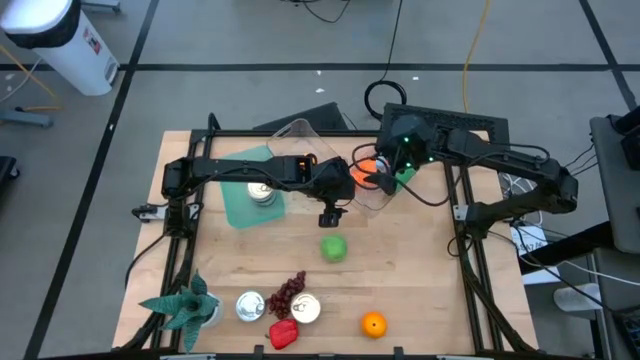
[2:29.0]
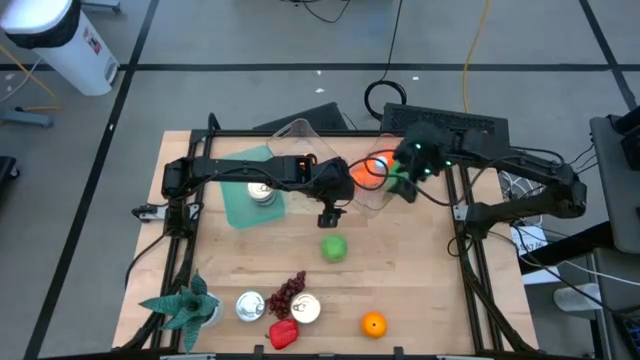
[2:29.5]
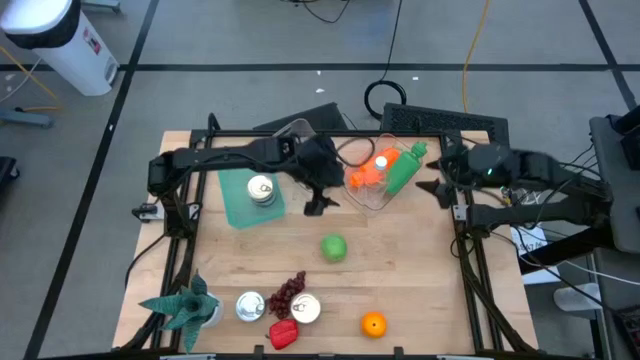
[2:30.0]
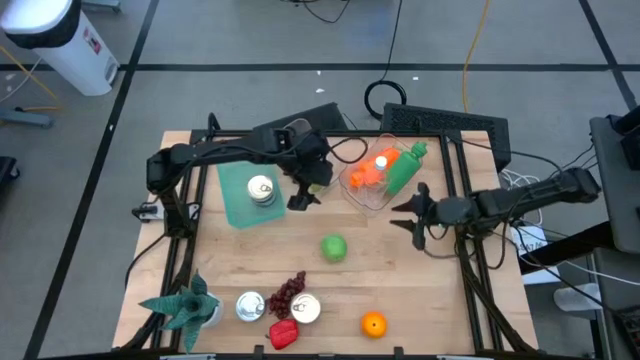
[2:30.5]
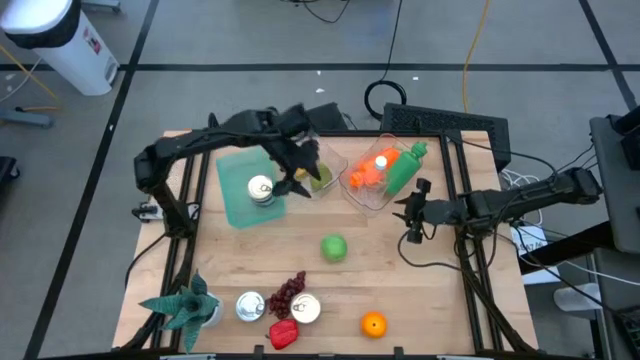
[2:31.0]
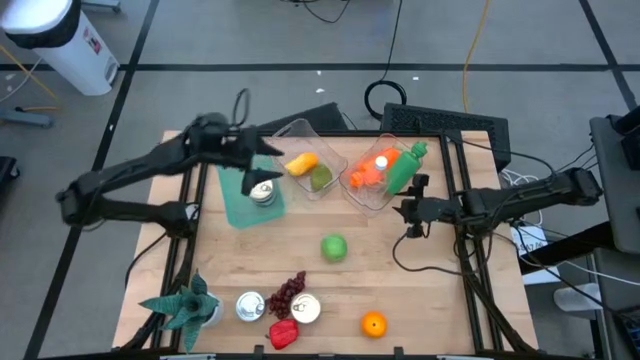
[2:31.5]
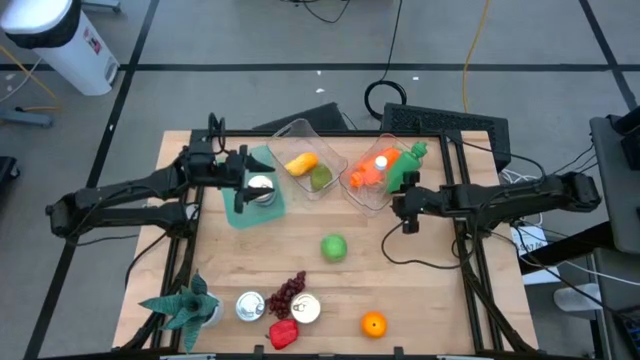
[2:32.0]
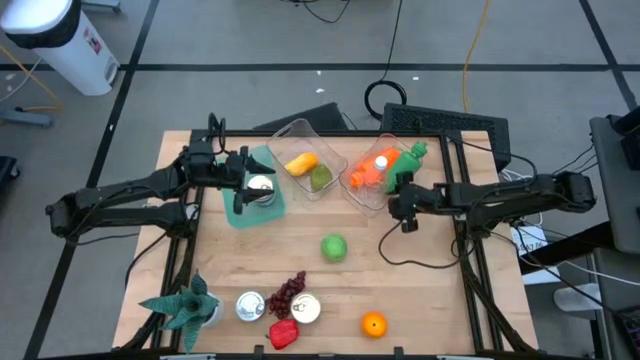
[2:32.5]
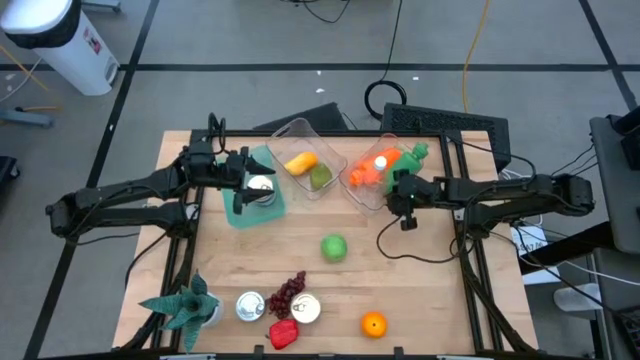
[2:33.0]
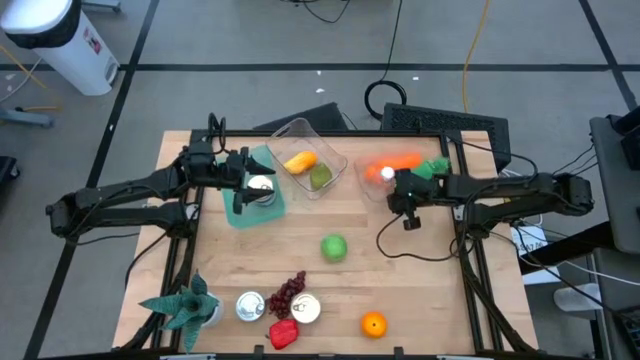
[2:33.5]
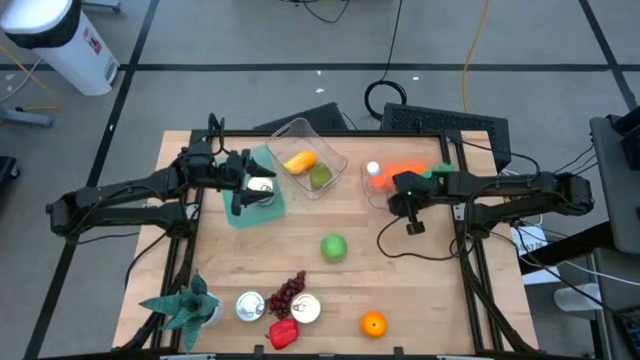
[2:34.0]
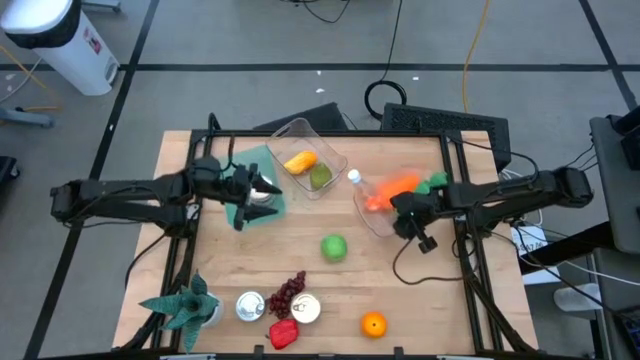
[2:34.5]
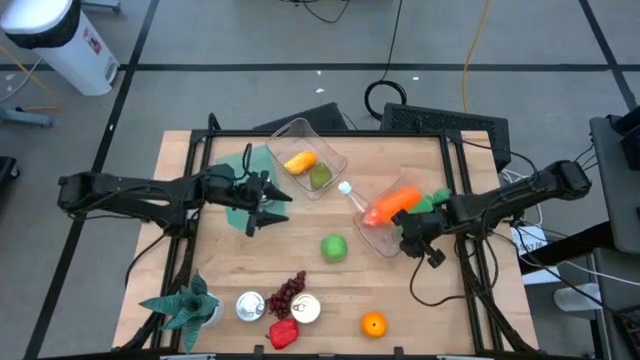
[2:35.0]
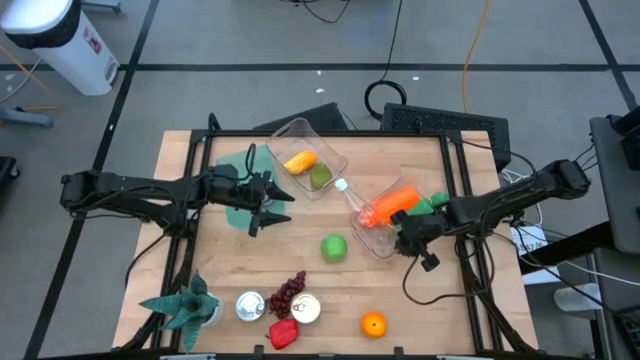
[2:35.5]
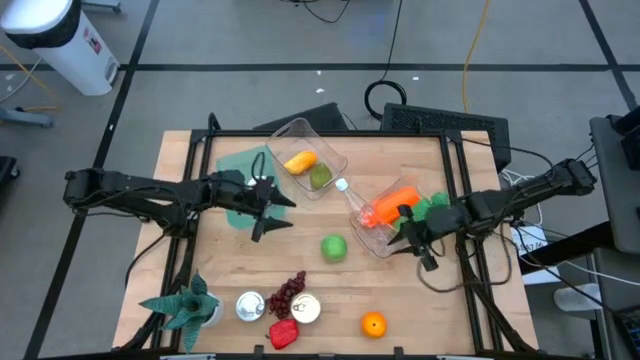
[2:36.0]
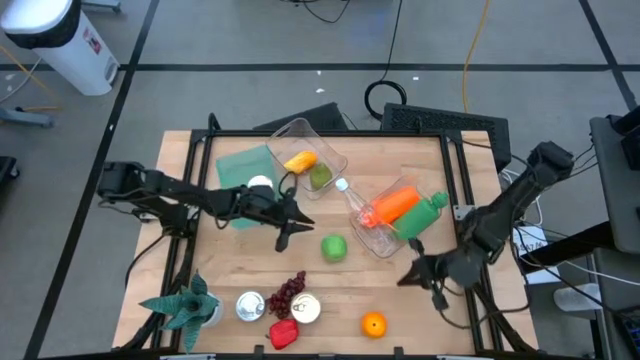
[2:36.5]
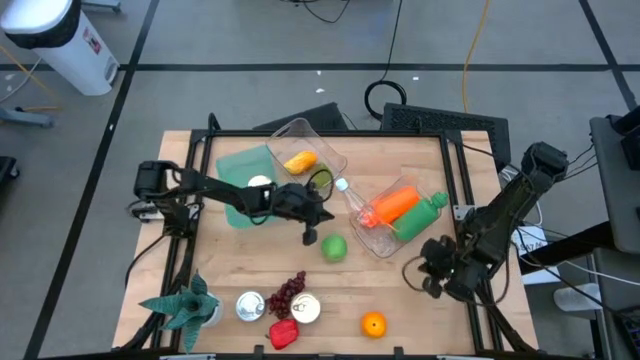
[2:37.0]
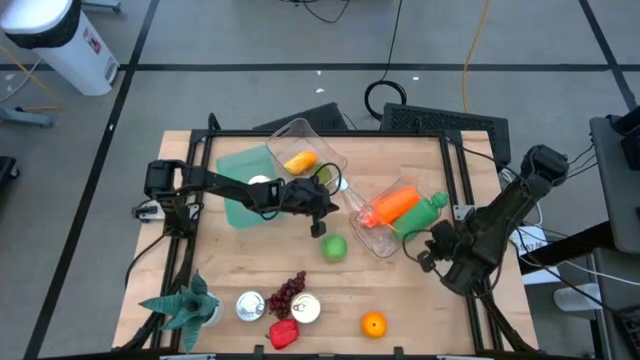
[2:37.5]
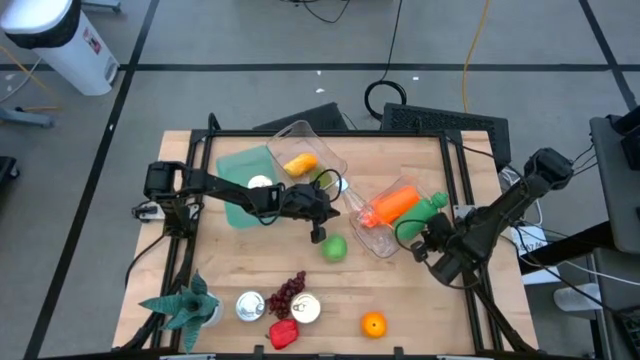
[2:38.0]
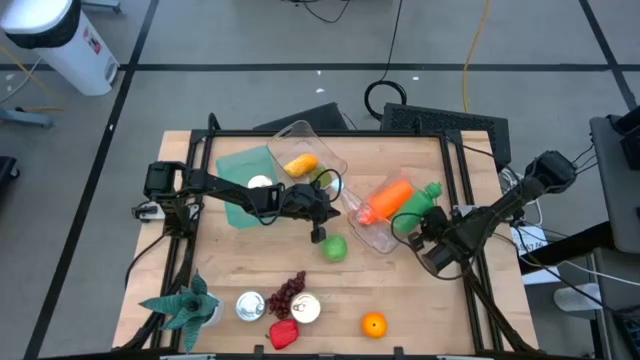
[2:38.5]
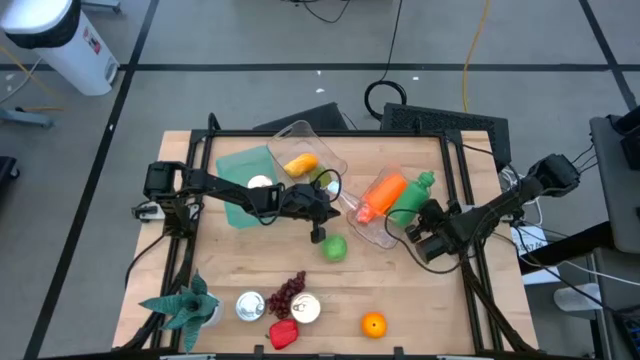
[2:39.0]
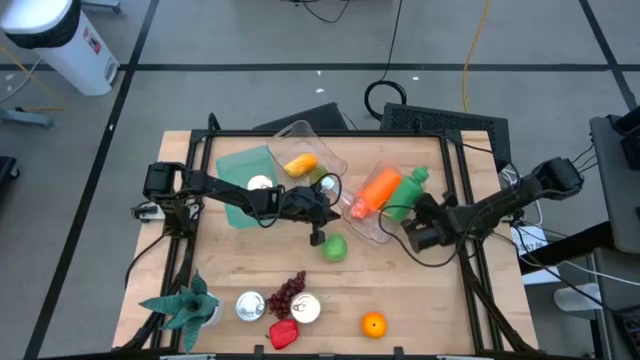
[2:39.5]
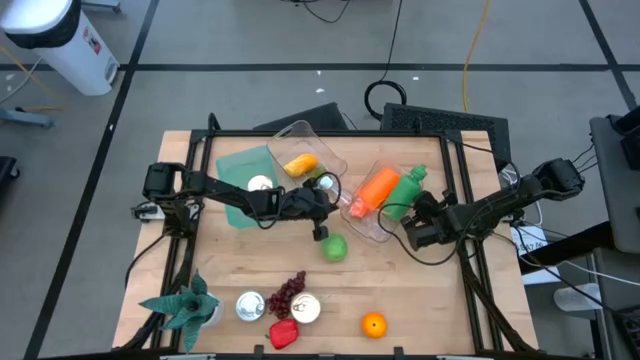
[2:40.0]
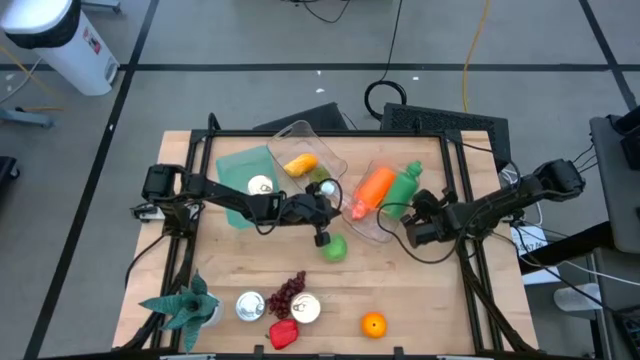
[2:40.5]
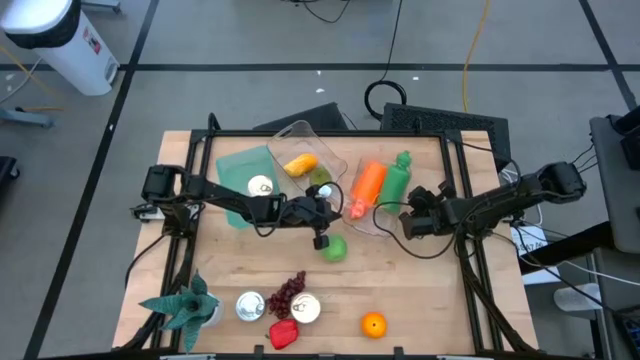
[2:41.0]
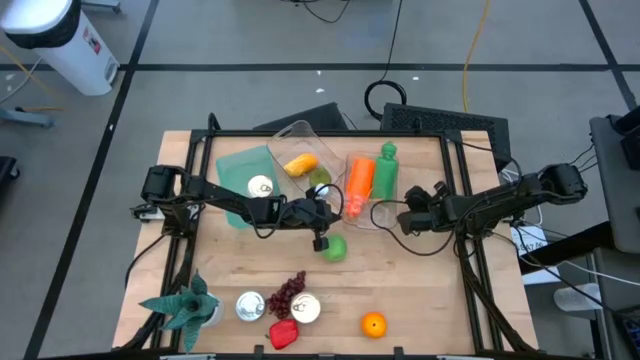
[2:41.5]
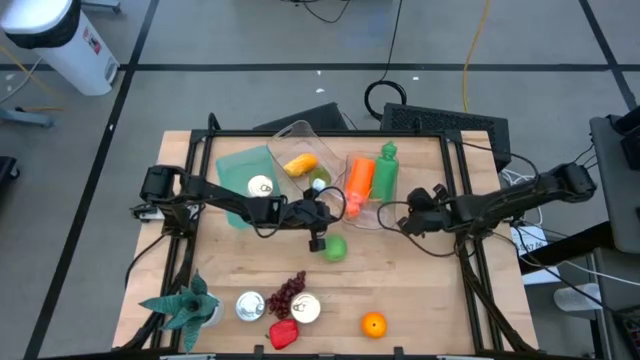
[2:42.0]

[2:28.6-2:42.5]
Task: Pick & Place Food Item
Move the right transparent bin to the middle right of the table

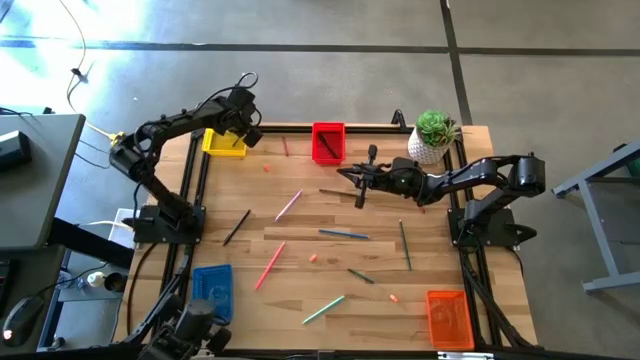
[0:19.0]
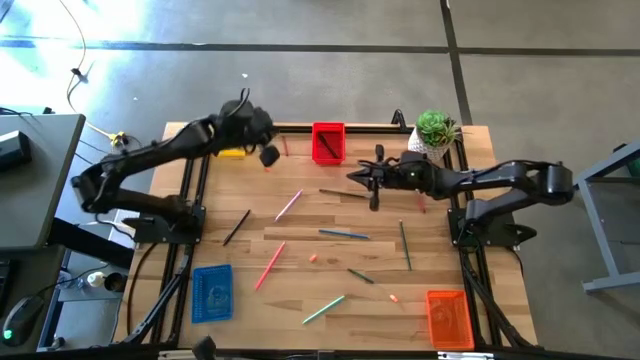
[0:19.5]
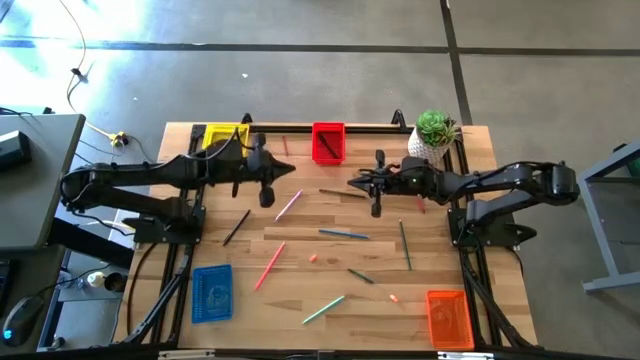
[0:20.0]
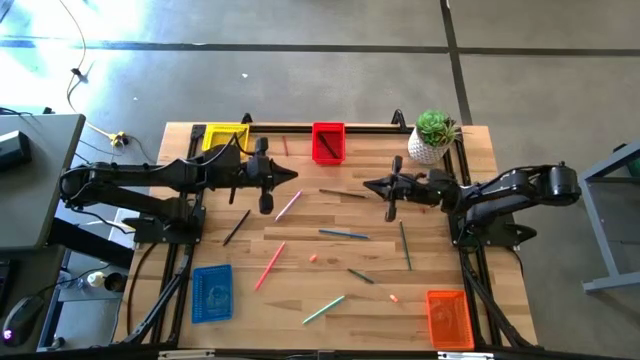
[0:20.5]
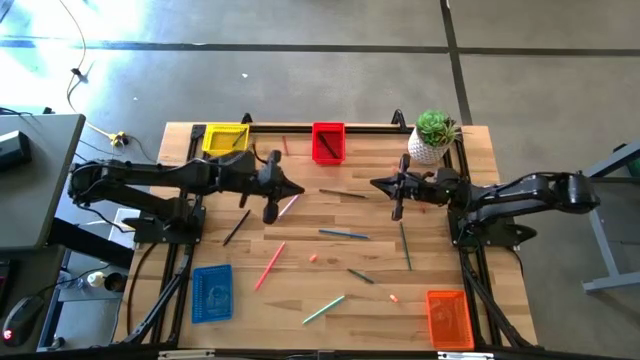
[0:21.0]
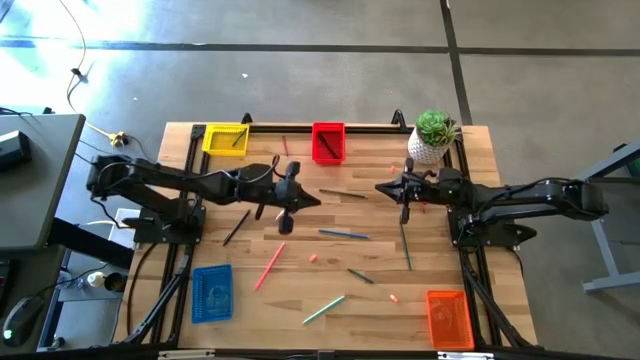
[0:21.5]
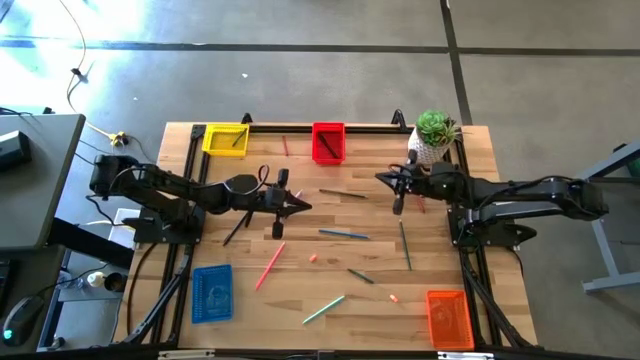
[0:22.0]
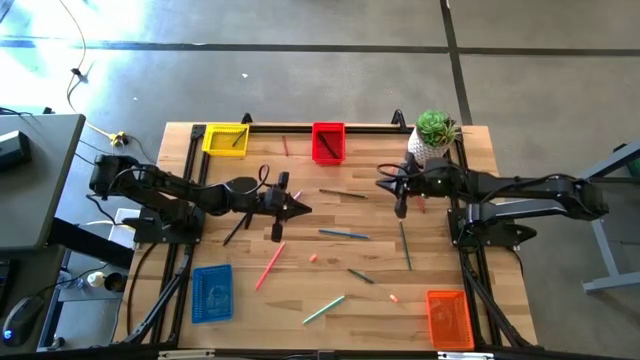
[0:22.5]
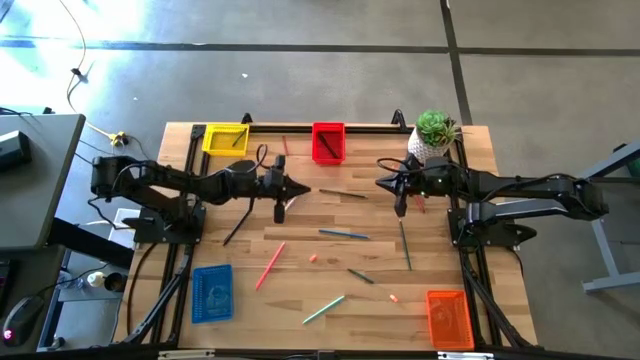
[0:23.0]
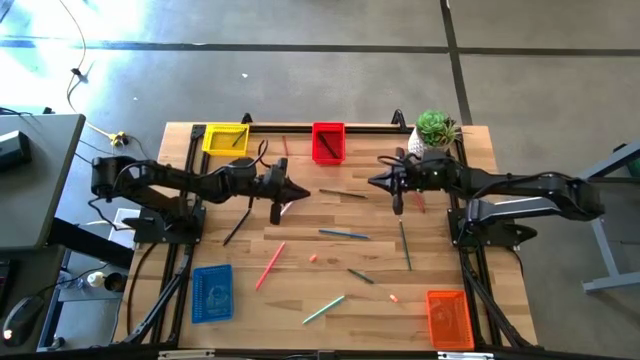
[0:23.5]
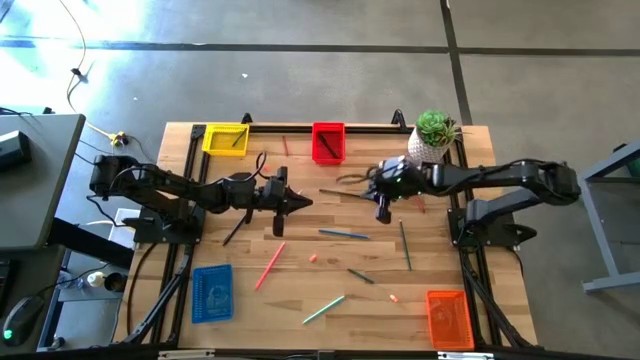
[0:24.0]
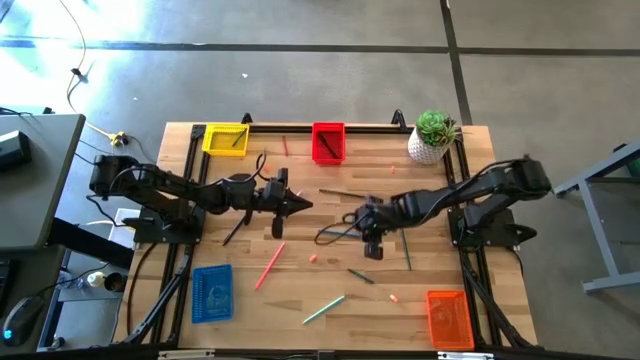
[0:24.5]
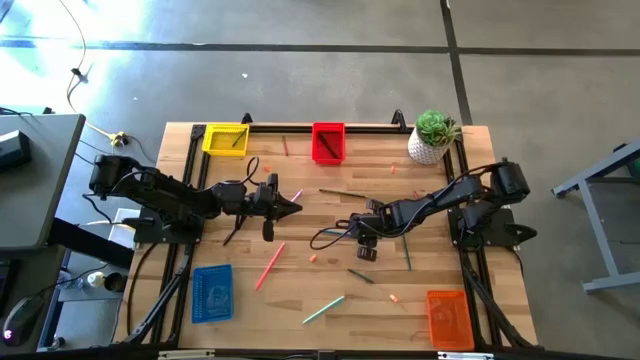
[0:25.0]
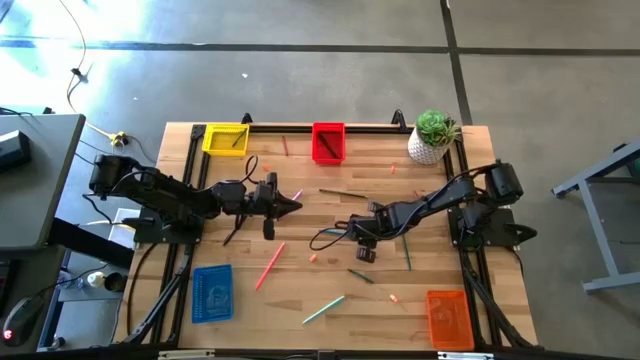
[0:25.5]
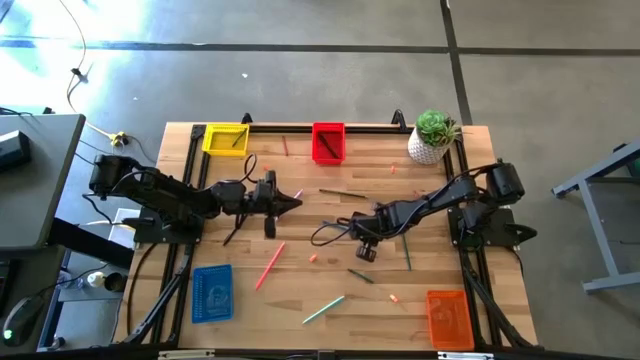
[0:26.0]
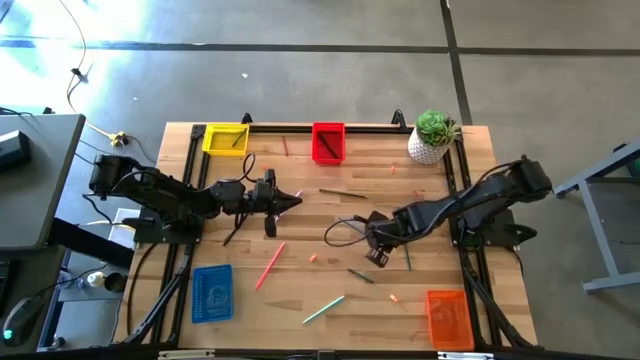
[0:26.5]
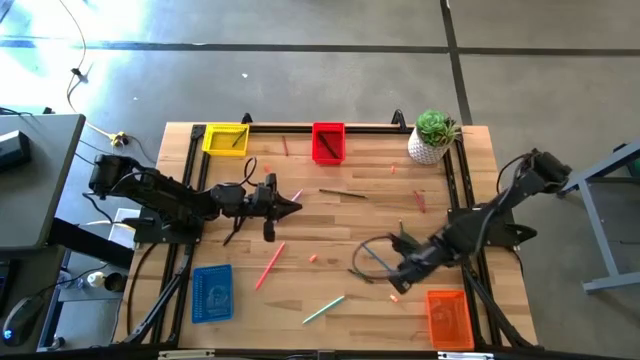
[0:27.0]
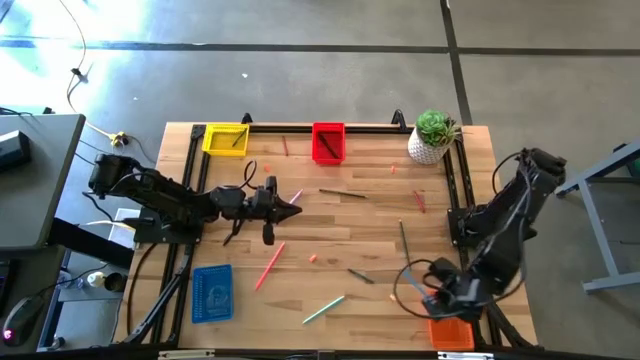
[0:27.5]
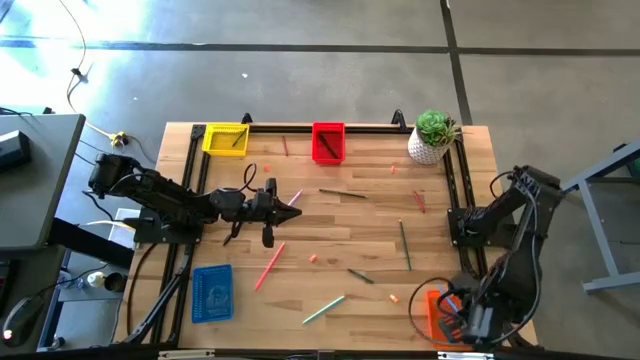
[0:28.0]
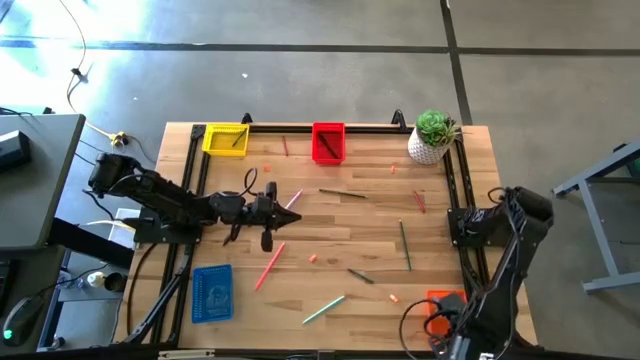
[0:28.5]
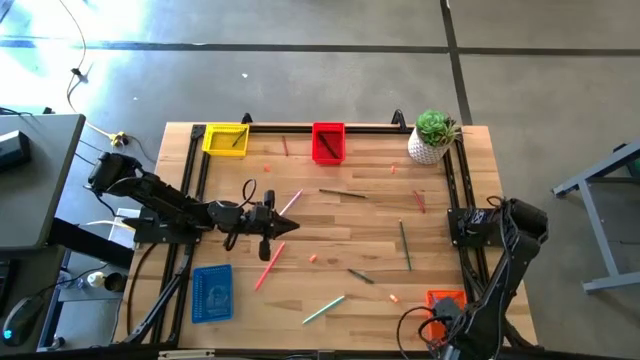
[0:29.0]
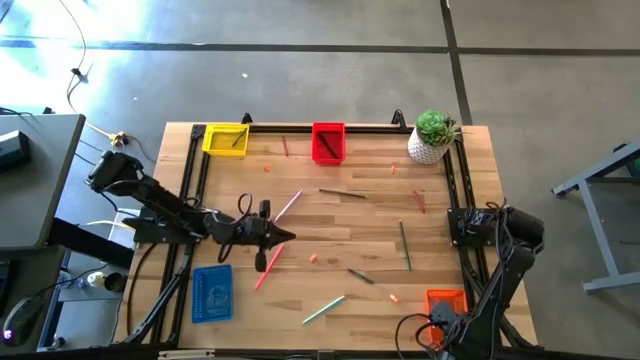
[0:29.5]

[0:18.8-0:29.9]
Task: Sort crayons/erasers/pens/pencils in bins
Put the blue pencil into the orange bin
